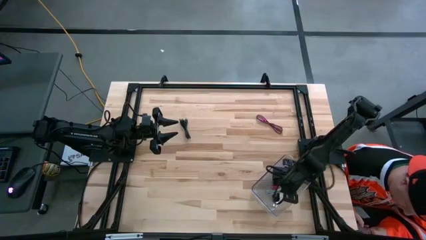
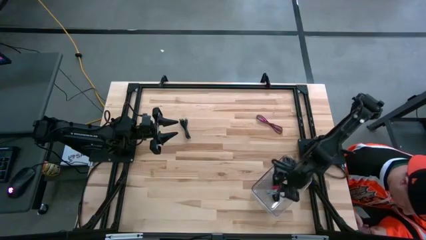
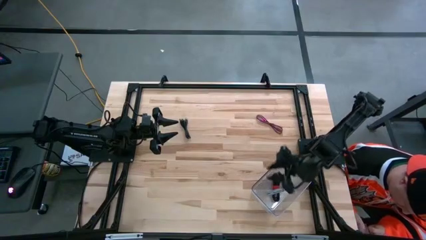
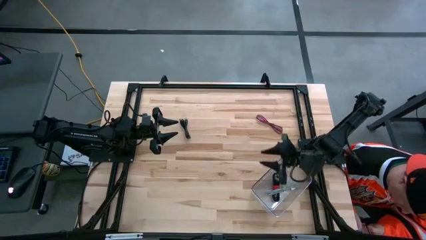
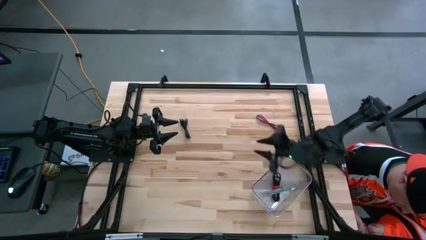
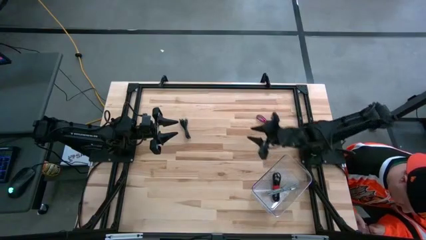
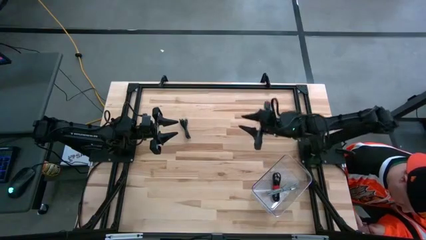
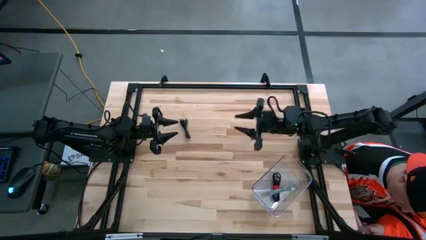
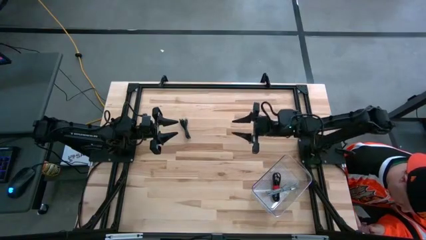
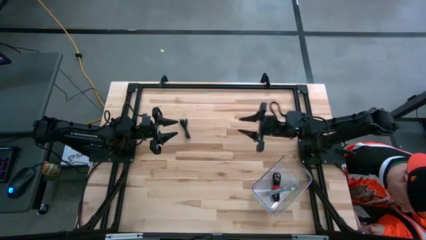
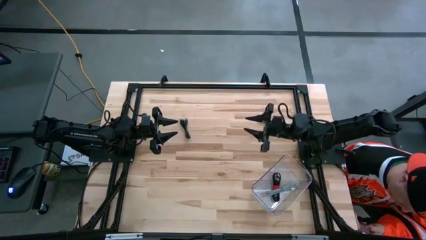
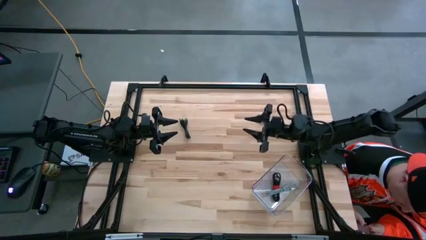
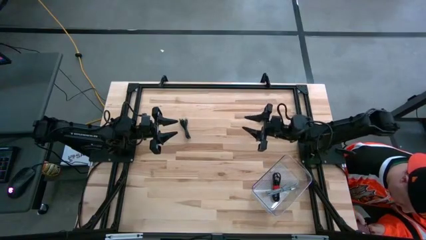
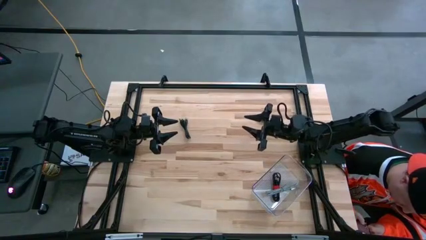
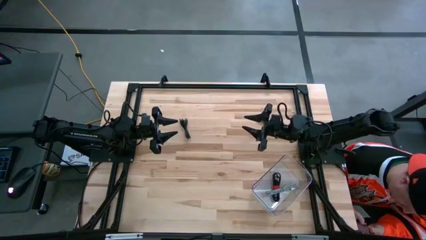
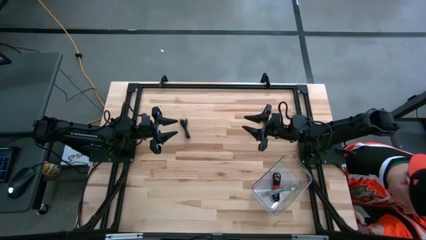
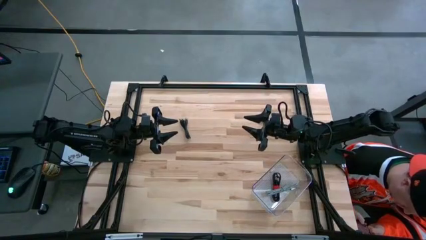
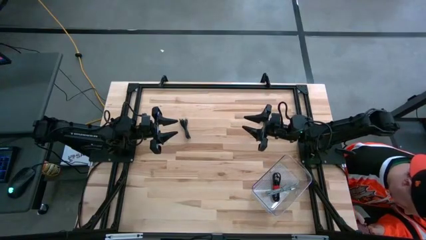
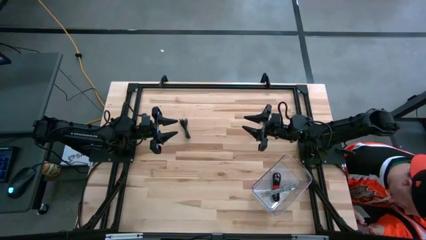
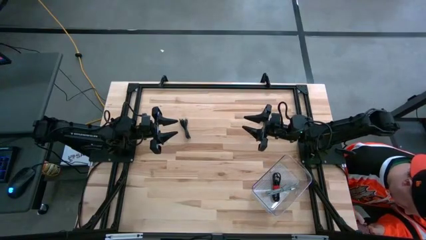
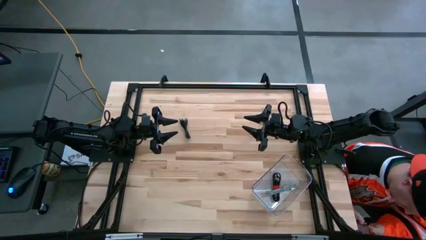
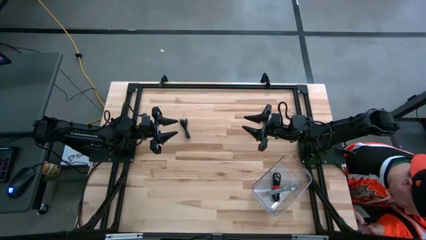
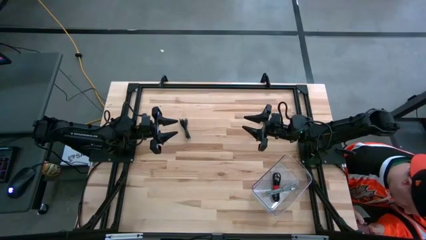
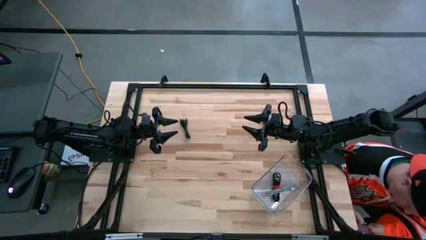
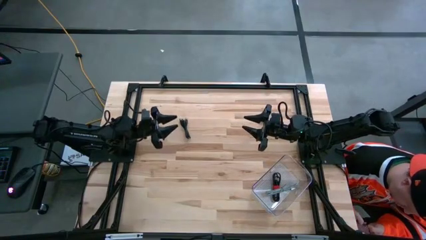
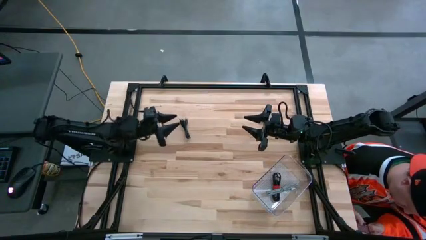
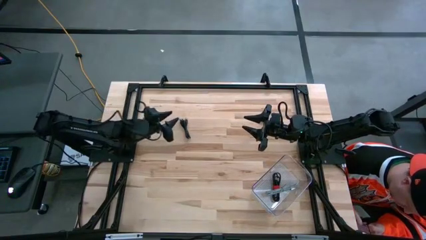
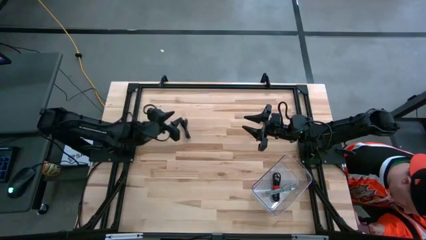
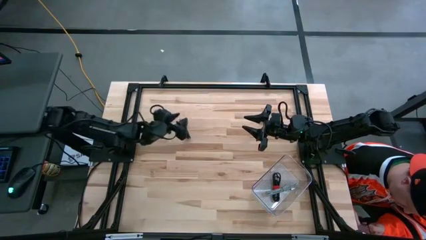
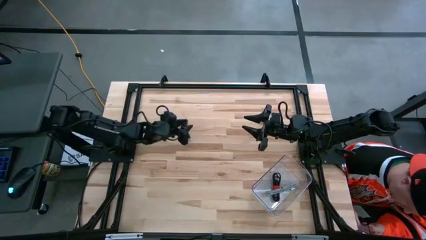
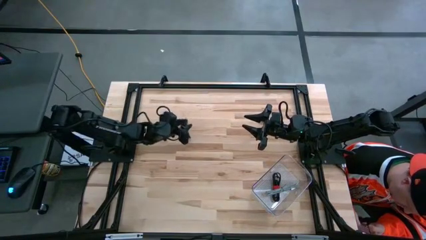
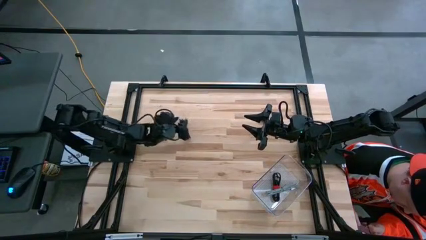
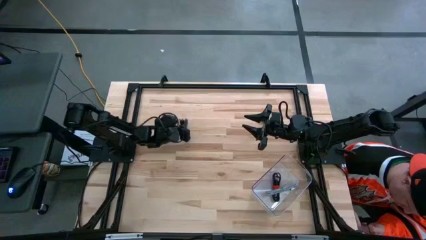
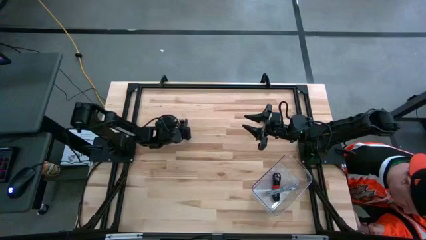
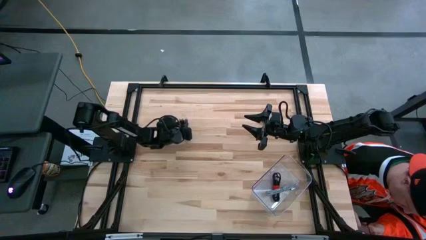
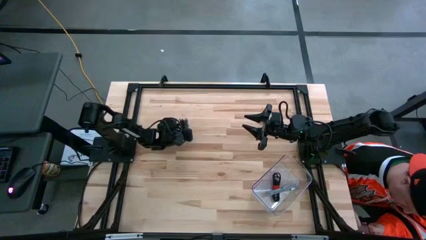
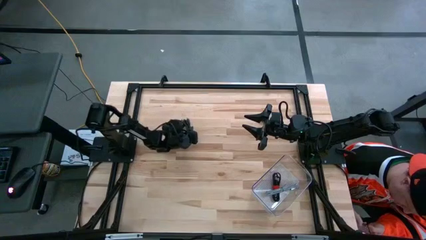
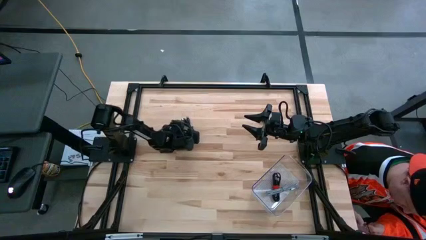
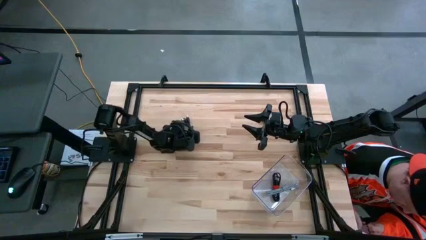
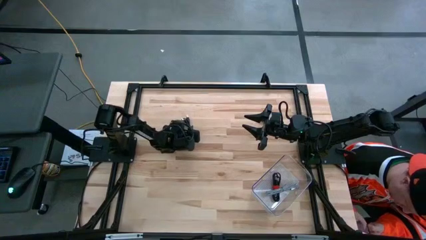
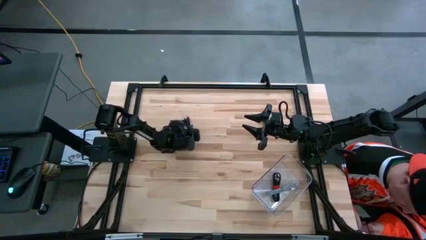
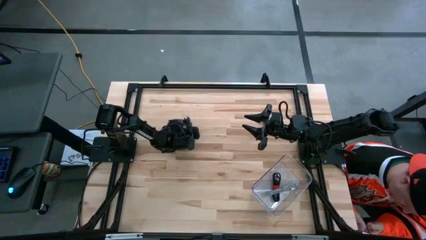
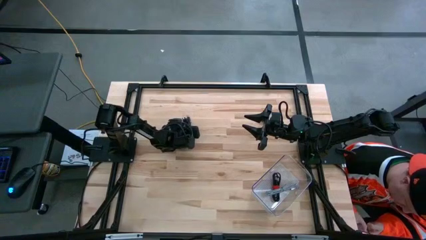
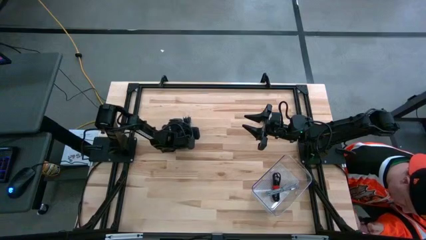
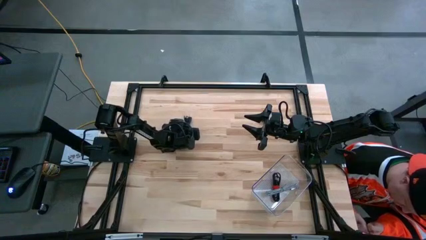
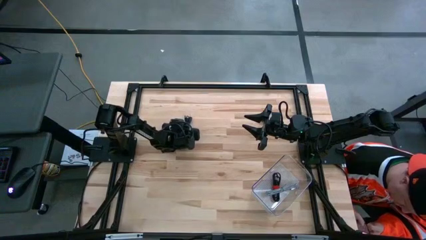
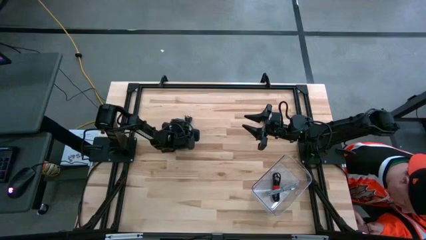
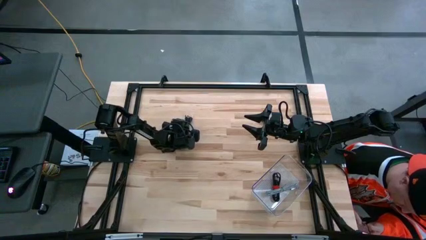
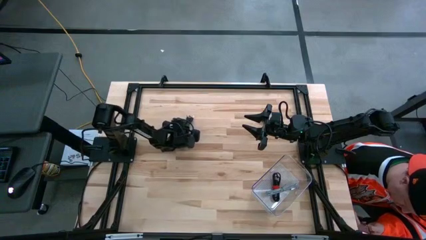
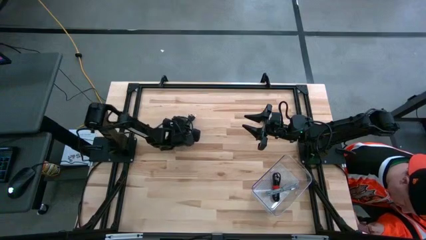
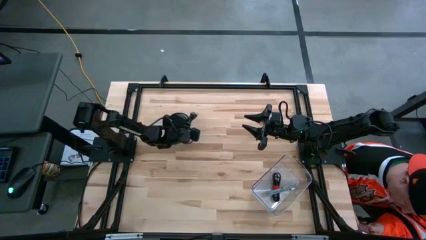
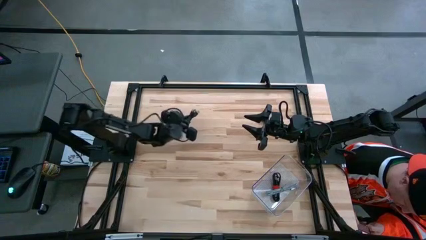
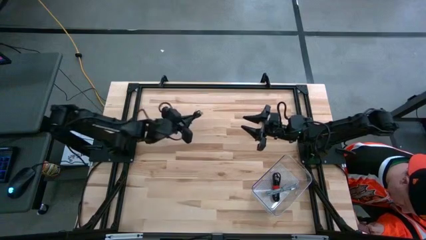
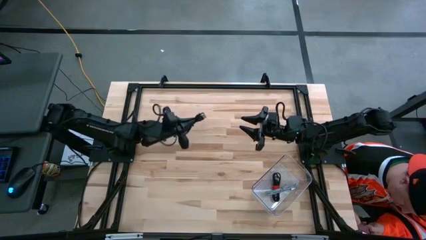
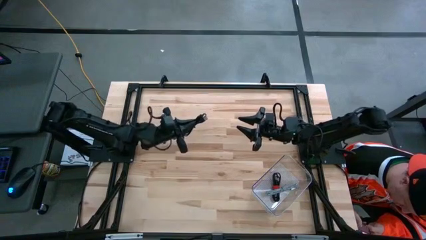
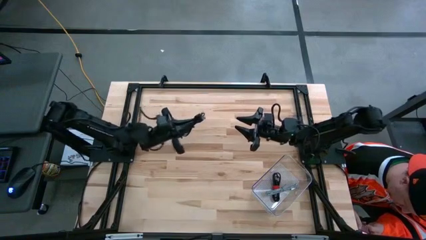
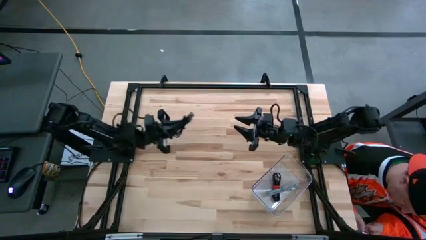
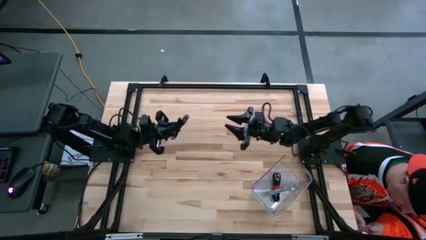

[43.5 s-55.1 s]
Task: Pick and place USB-C Cables
Put the black charger cable into the transparent bin
